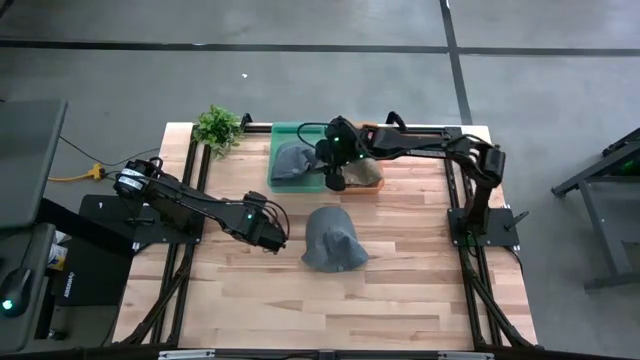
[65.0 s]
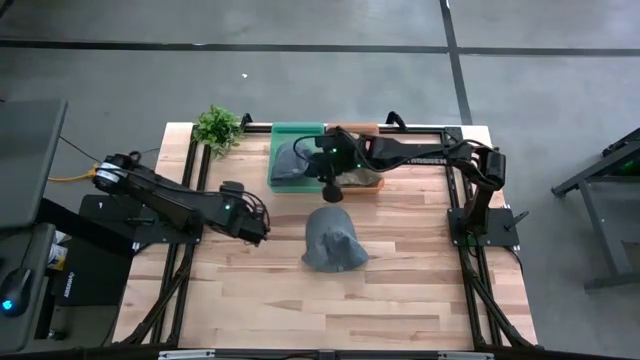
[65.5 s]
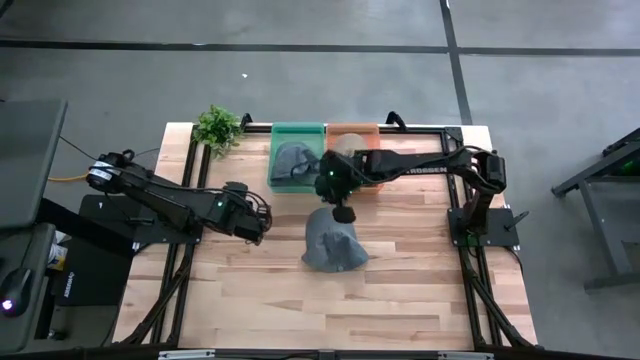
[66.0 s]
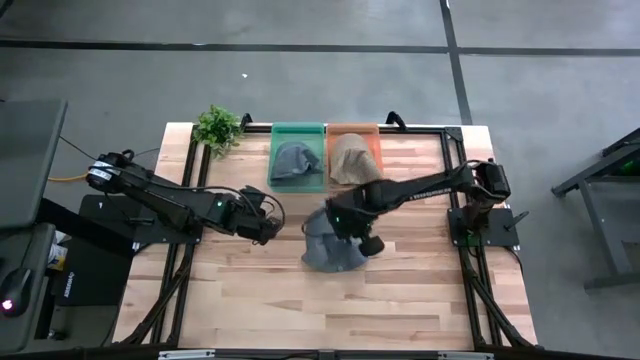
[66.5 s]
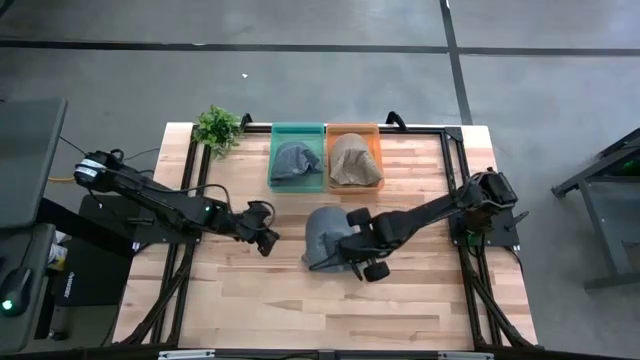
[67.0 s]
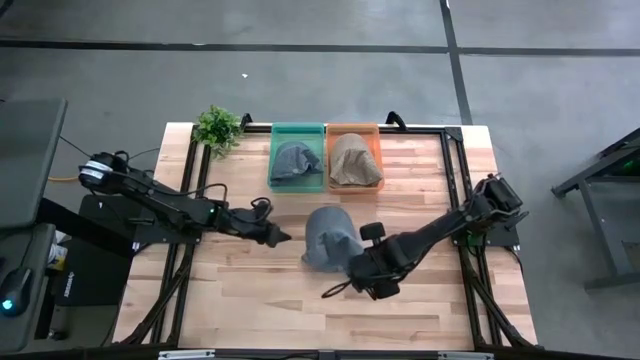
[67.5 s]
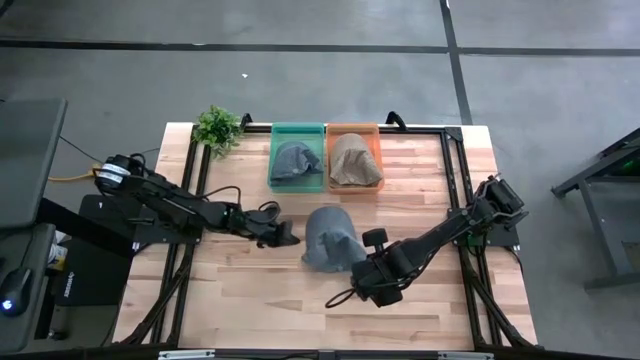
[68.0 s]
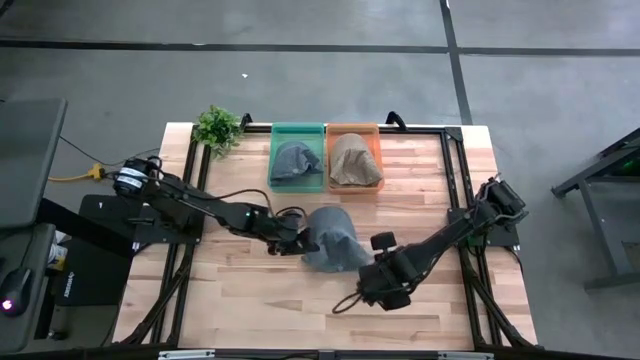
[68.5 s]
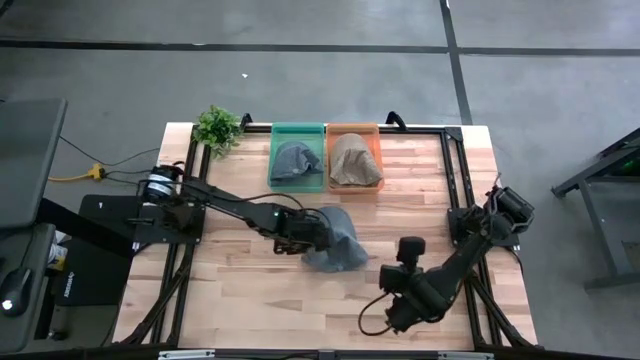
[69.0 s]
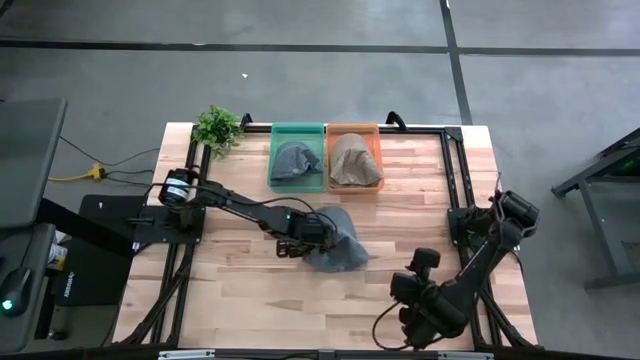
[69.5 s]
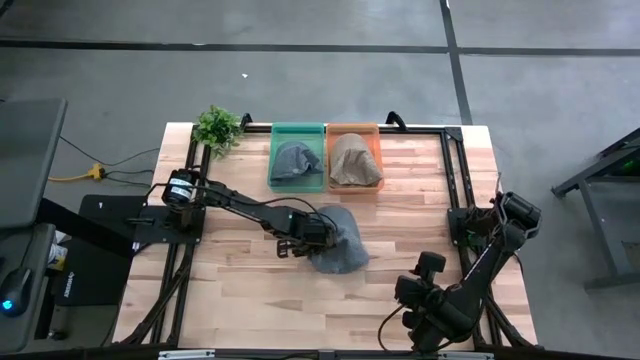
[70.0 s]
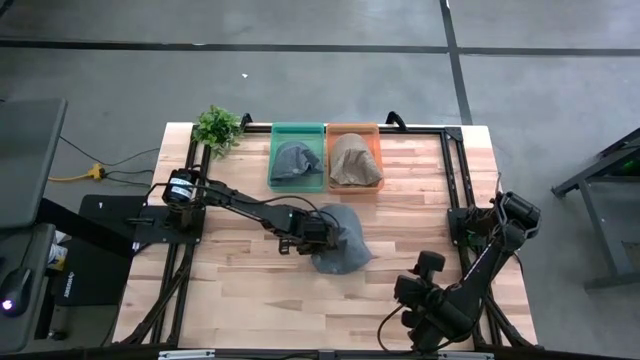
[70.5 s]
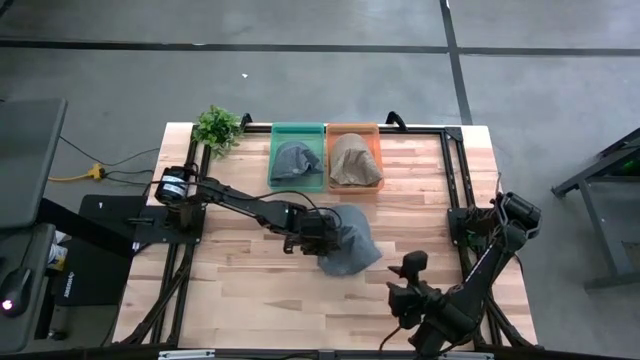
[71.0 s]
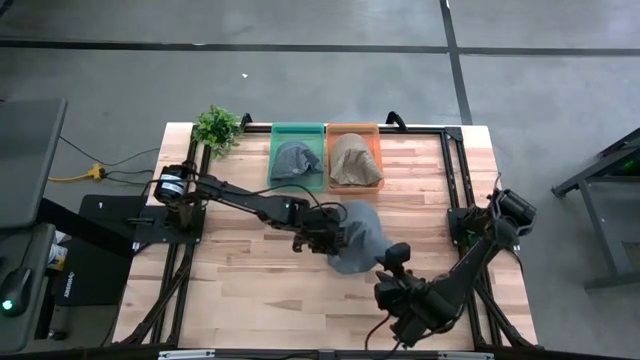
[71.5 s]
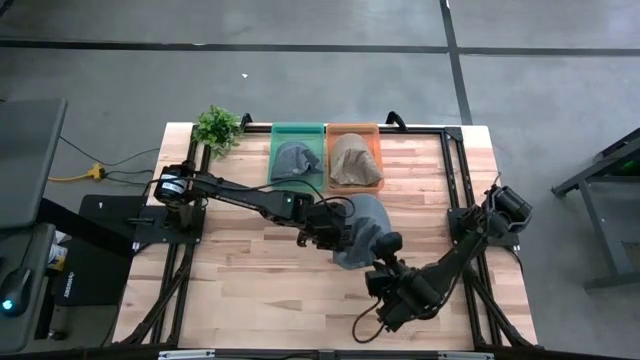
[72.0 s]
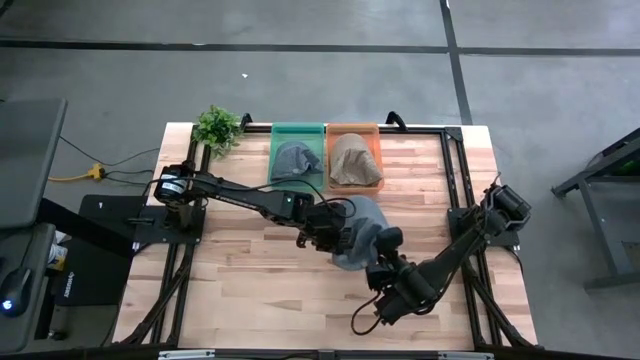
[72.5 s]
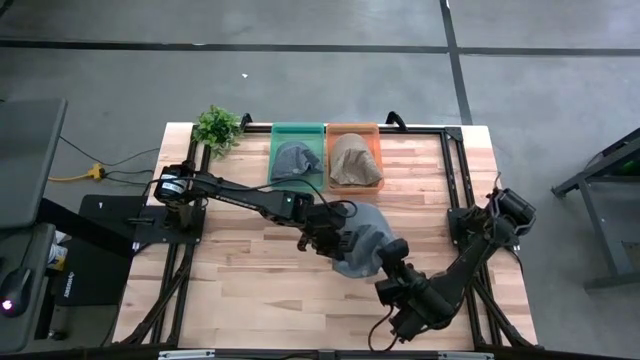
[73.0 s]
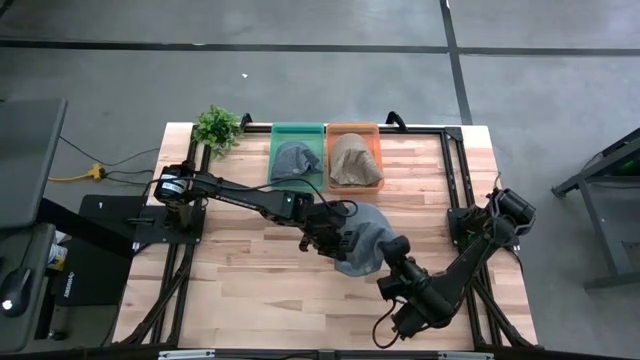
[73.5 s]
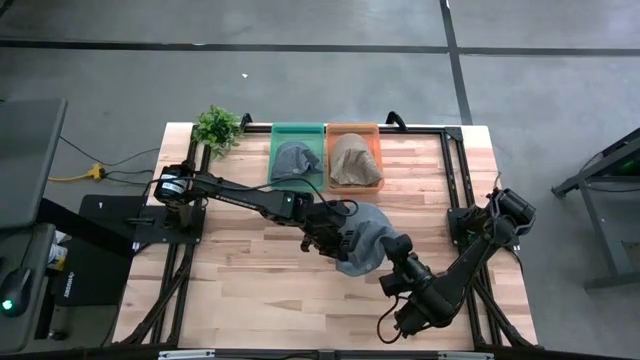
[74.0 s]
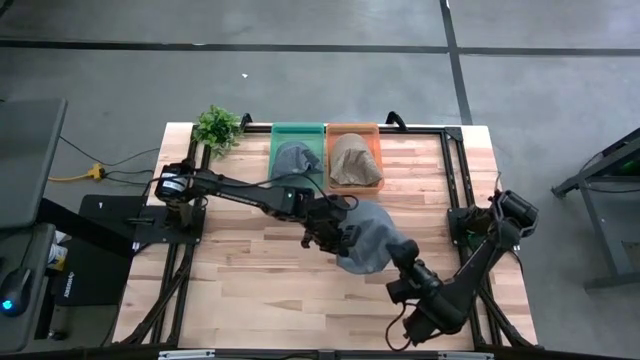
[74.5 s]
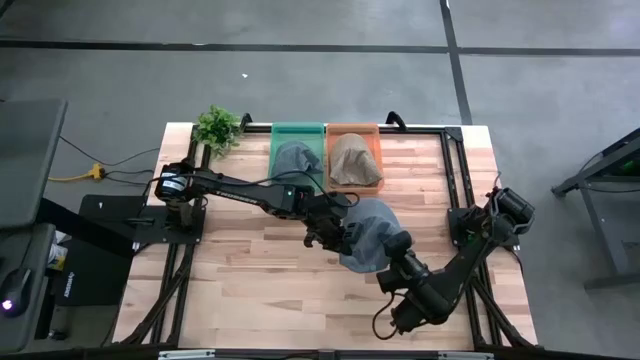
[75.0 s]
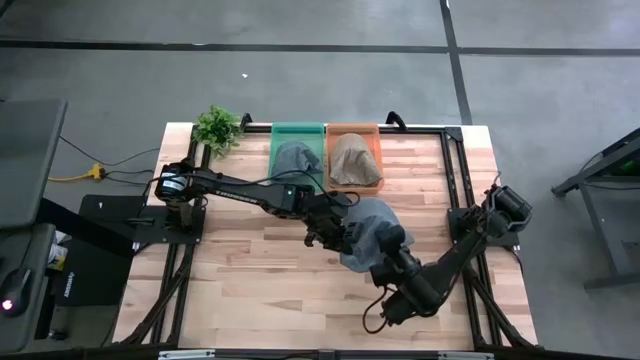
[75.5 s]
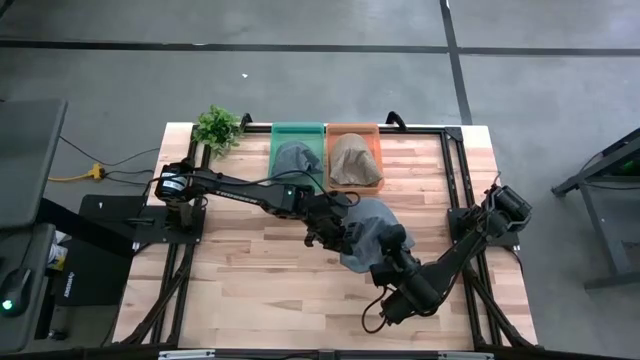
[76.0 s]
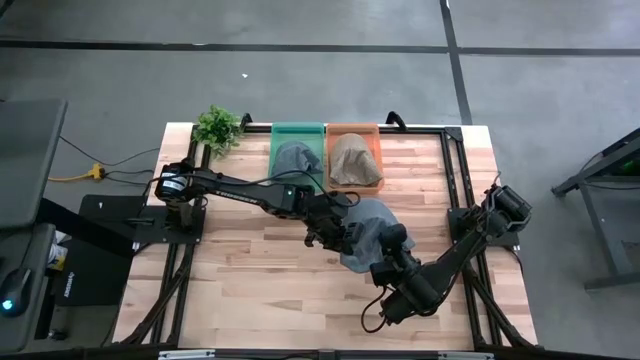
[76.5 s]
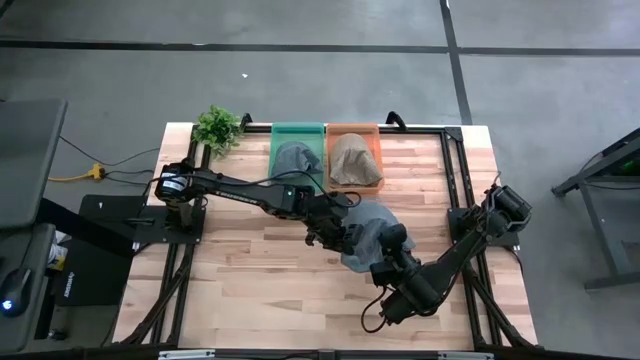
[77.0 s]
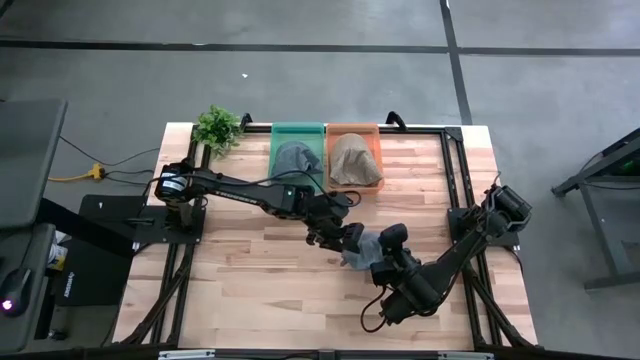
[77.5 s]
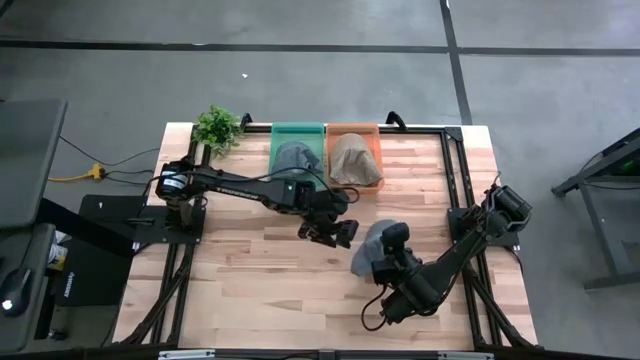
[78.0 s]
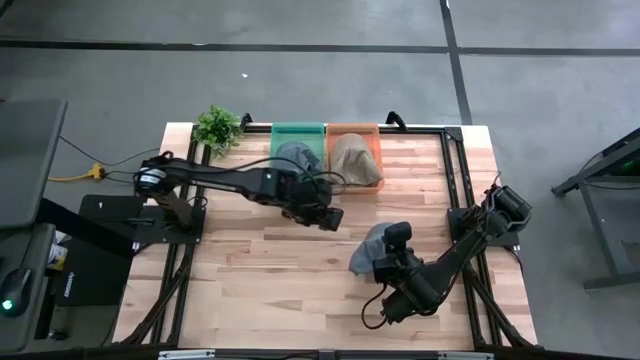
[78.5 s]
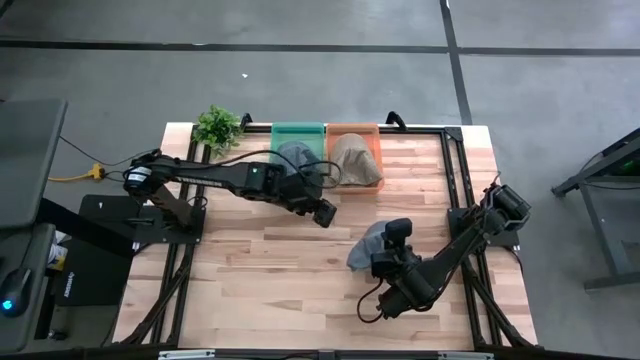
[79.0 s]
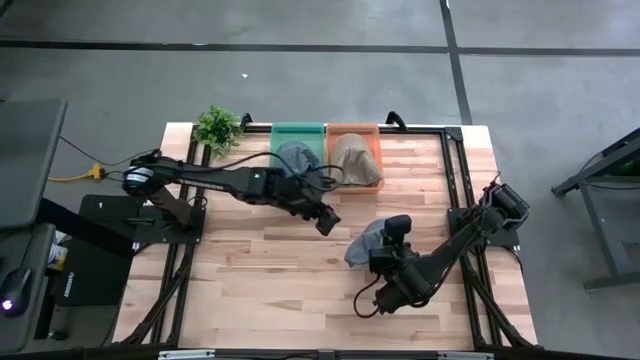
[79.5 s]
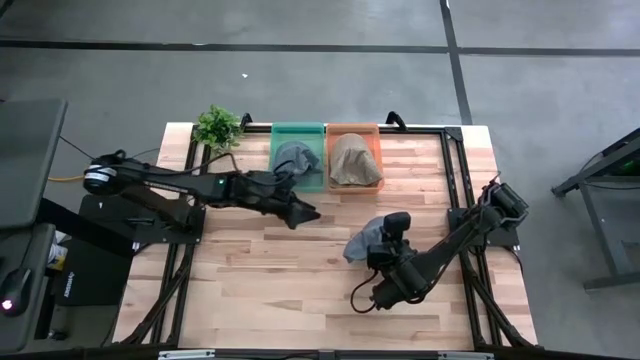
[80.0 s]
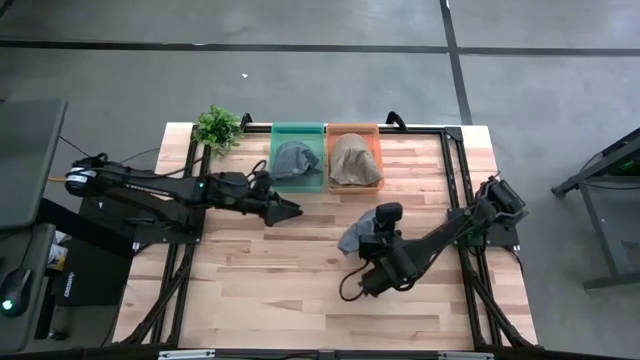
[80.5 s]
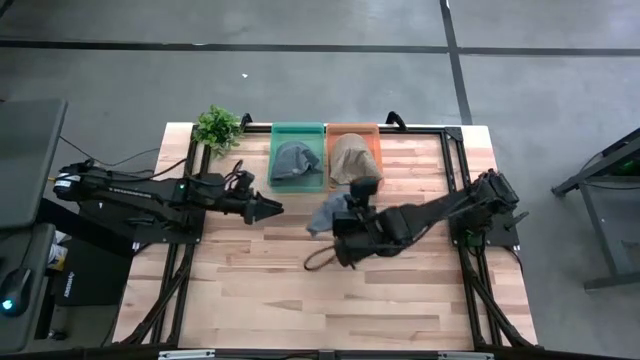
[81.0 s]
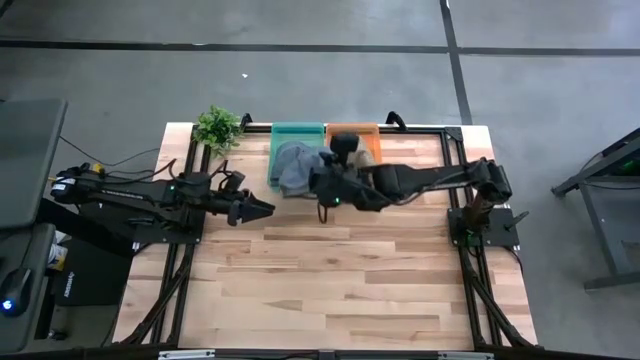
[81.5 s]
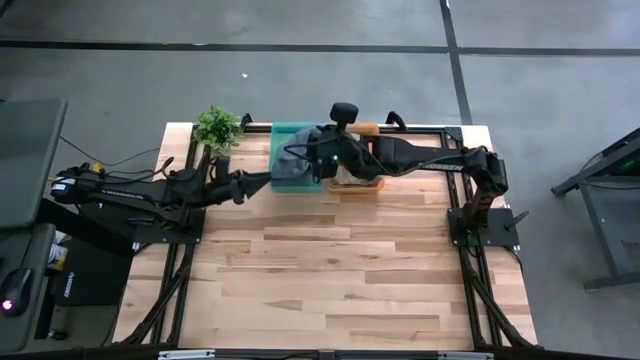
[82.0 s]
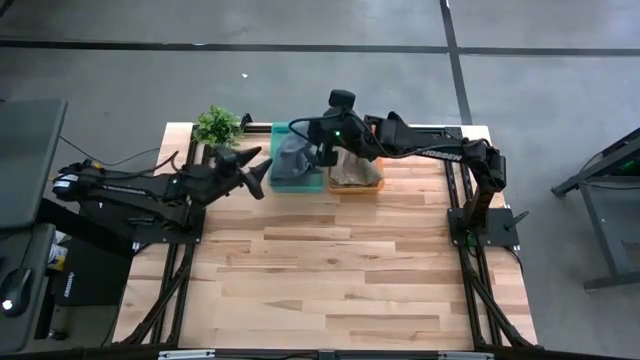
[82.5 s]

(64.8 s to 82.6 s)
Task: Pick & Place hat
Put the blue cap into the green bin

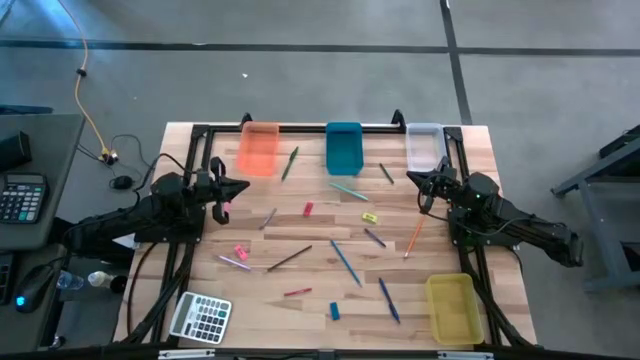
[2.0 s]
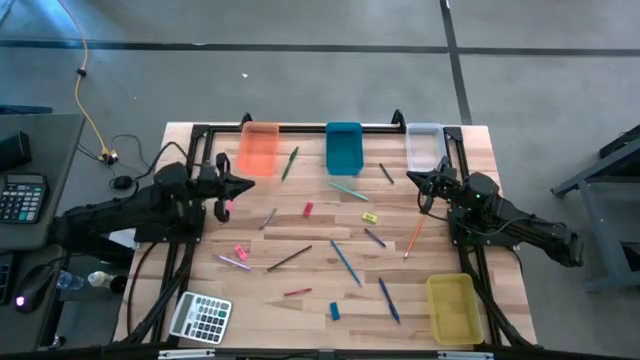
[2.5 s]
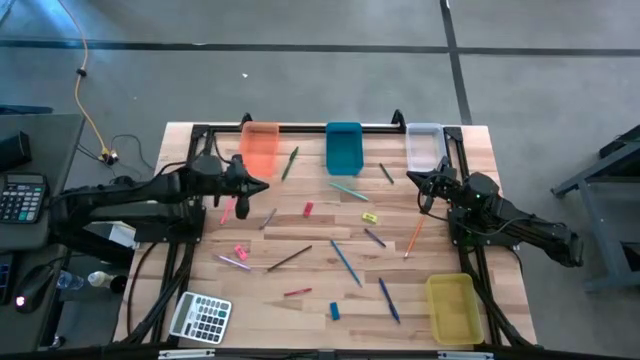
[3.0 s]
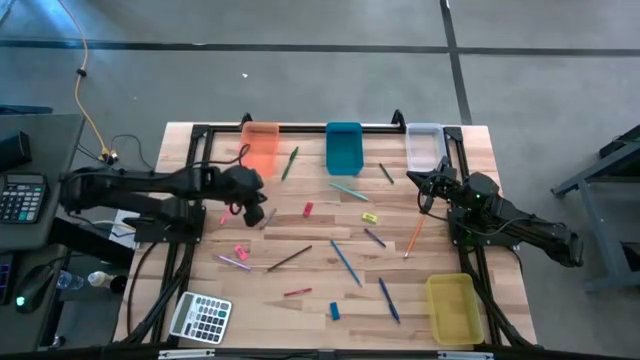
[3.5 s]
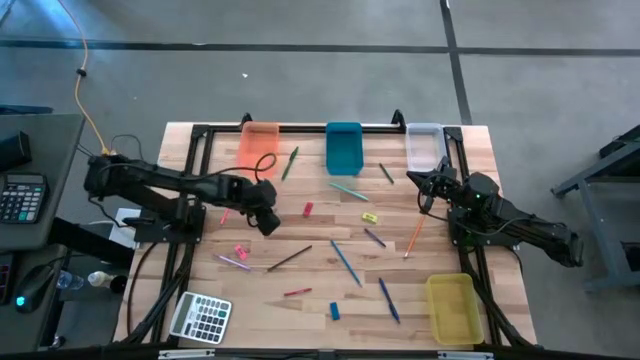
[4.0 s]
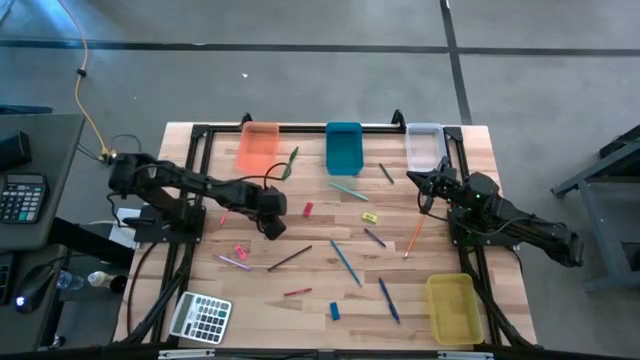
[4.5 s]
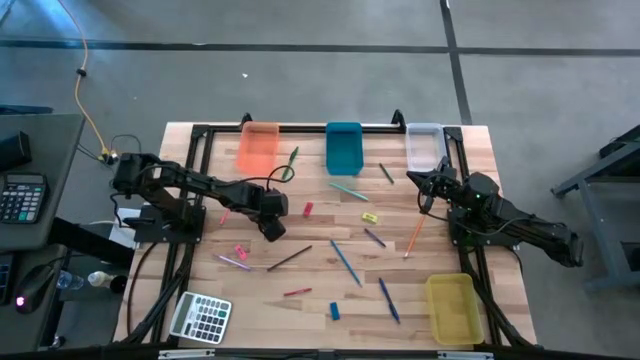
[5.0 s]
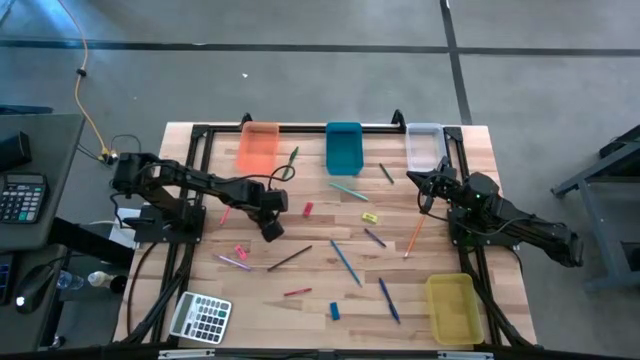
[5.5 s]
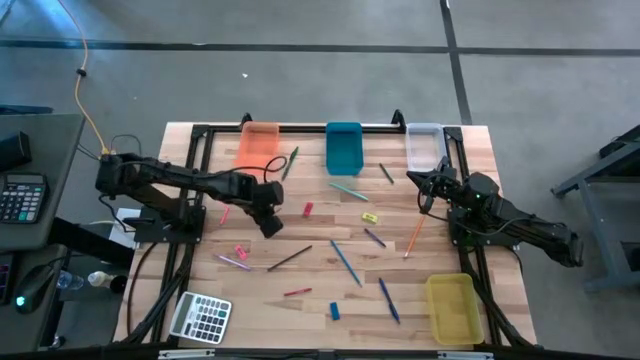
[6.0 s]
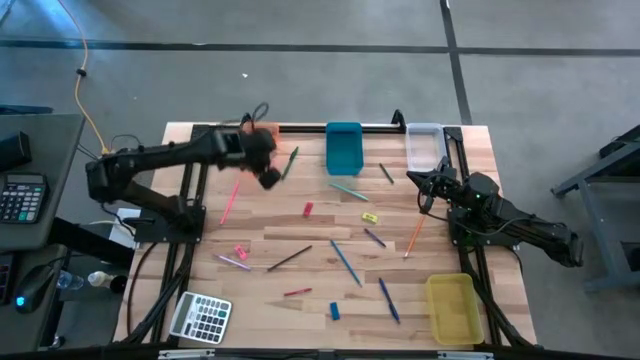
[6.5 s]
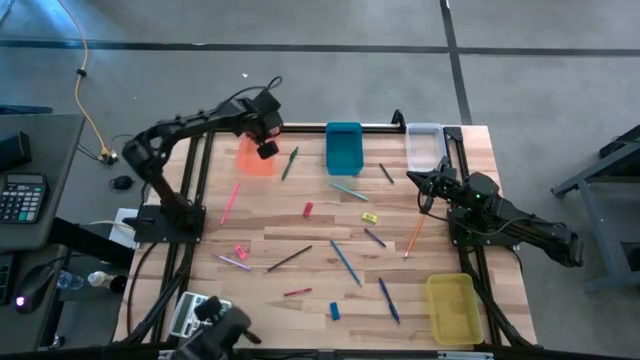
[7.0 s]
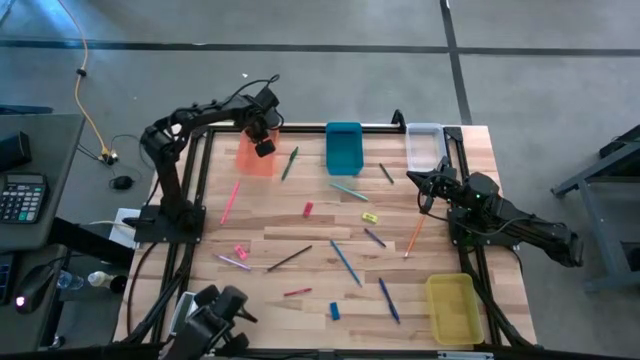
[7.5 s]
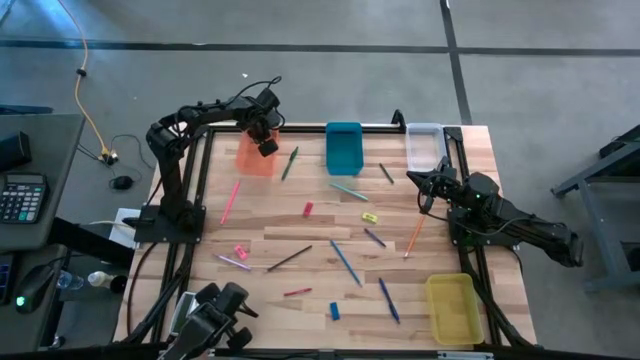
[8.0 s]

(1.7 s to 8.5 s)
Task: Sort crayons/erasers/pens/pencils in bins
Put the gray crayon into the orange bin
